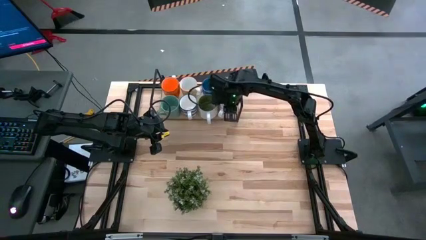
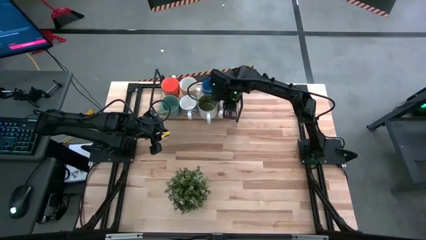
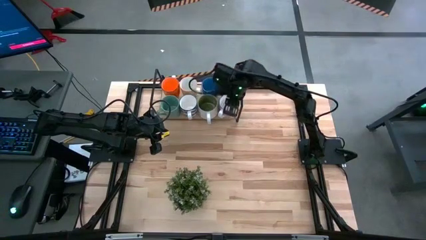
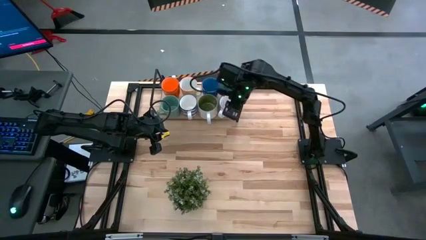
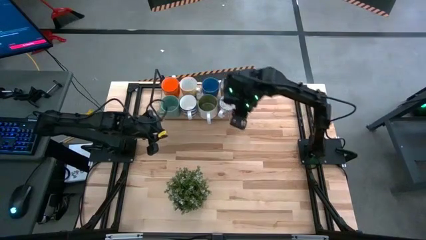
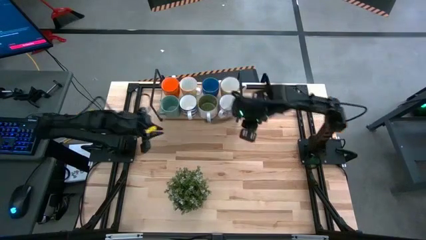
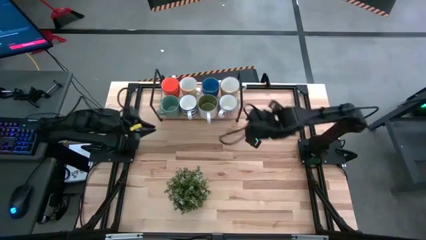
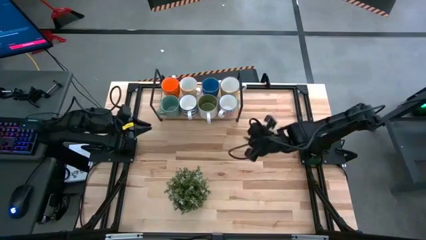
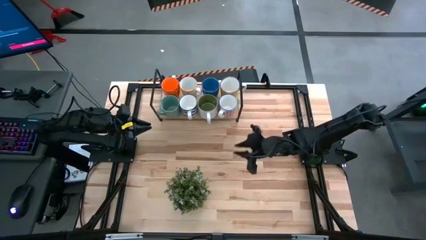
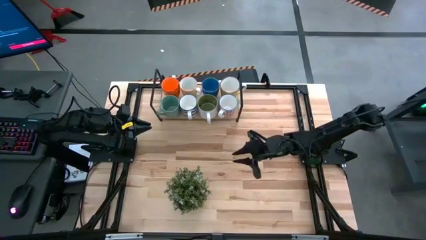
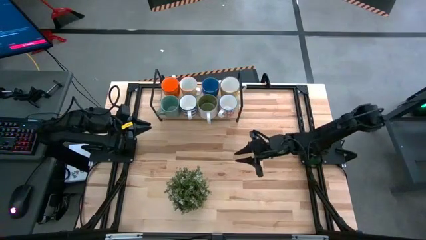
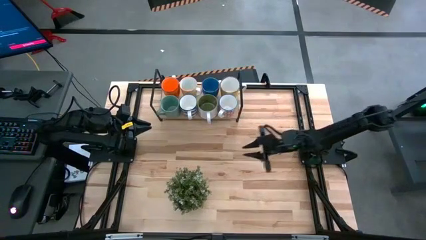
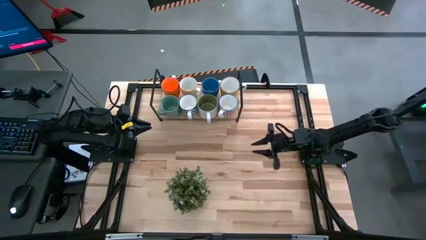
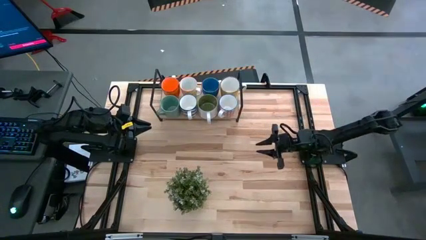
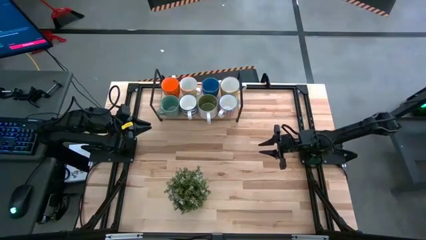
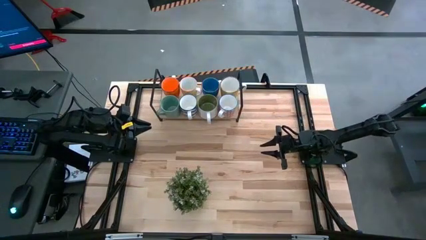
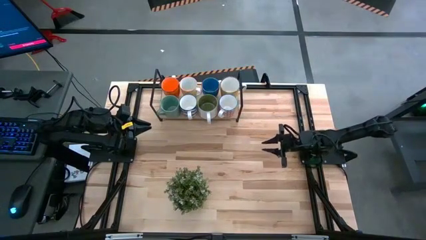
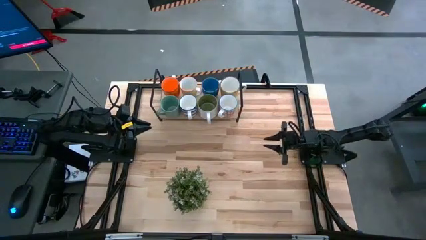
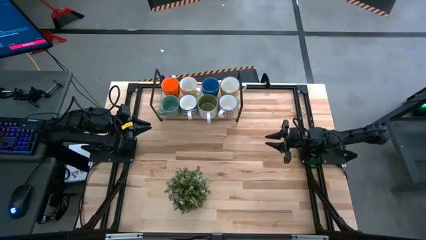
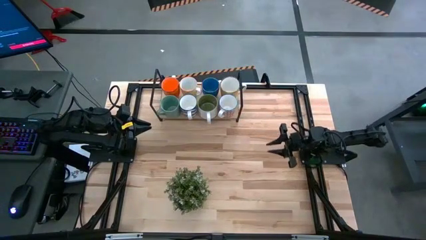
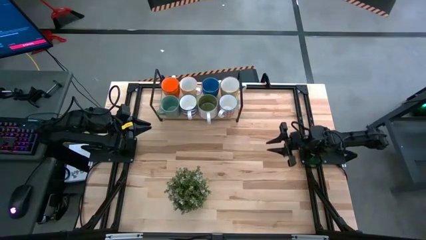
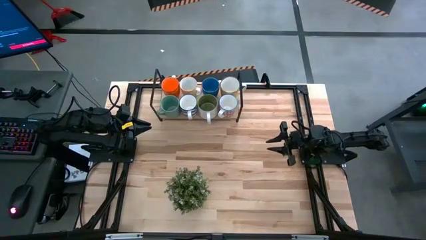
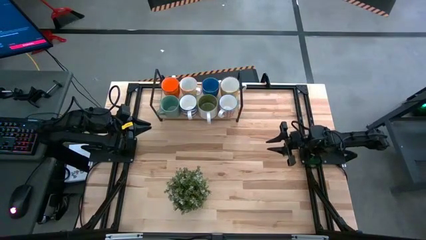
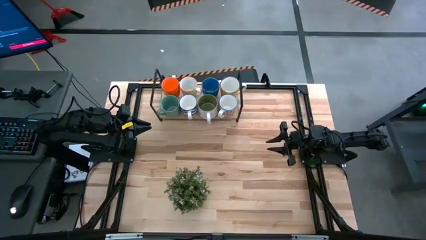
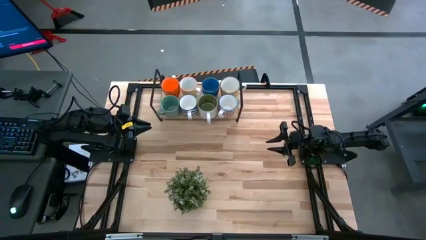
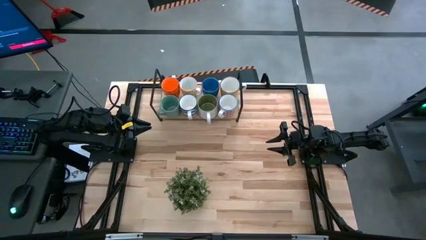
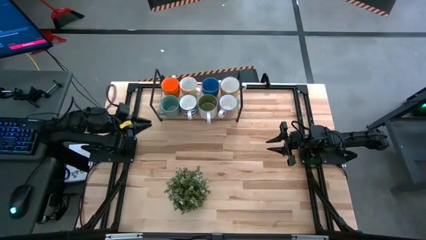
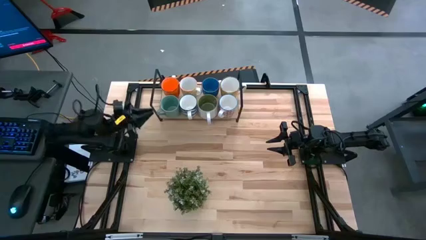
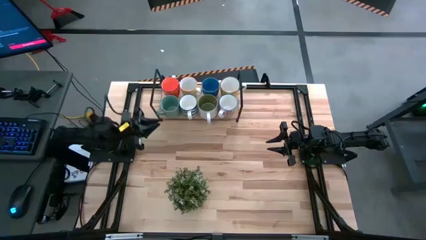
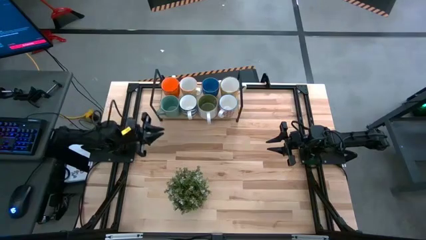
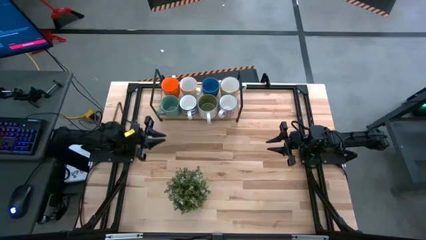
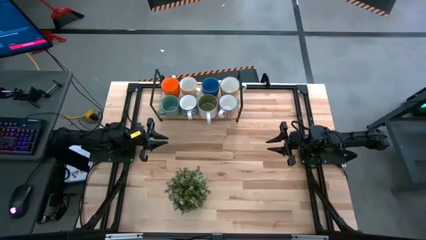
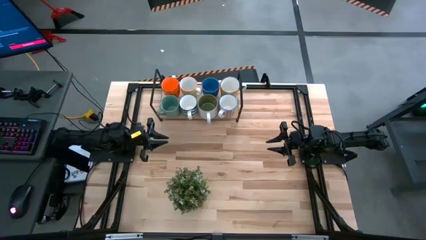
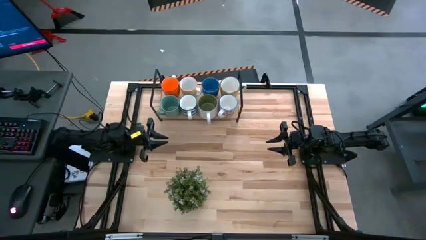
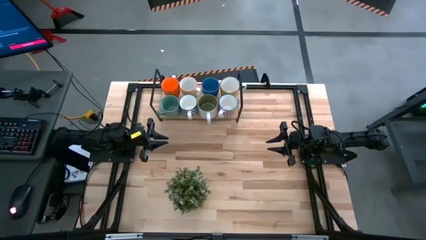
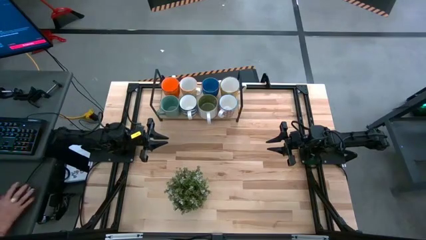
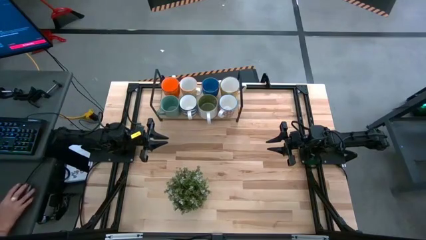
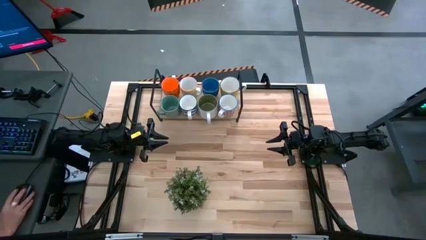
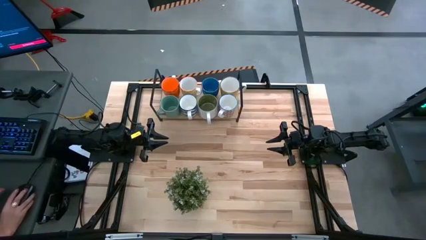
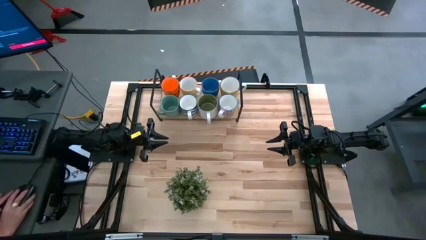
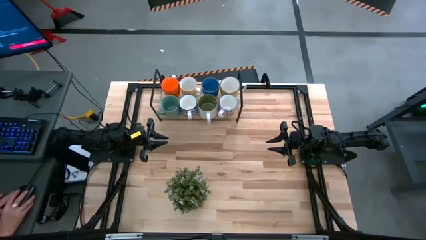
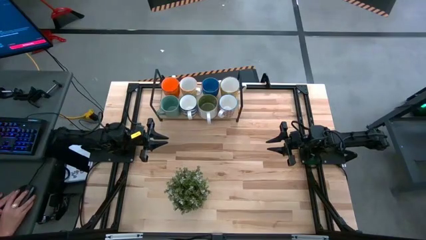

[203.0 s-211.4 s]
Task: Place coffee mugs
Return to Home Position

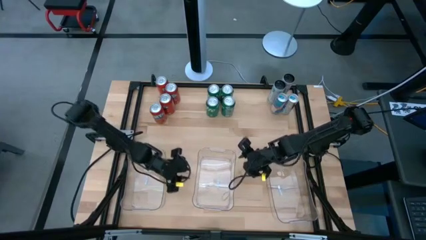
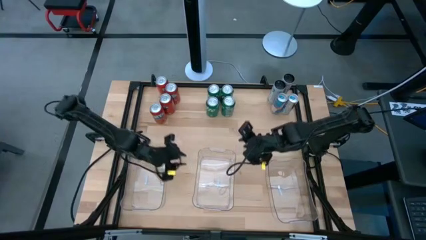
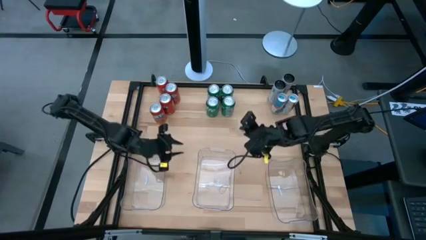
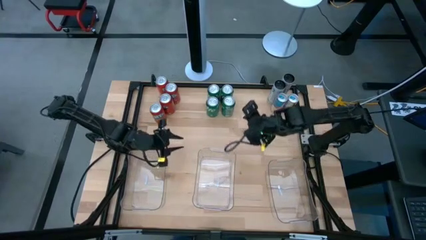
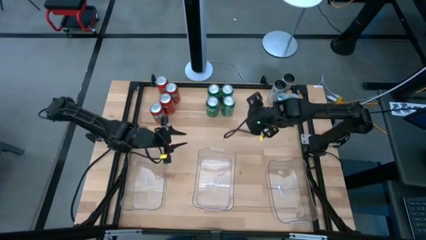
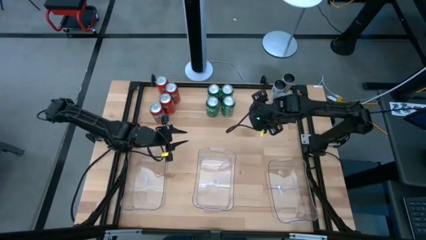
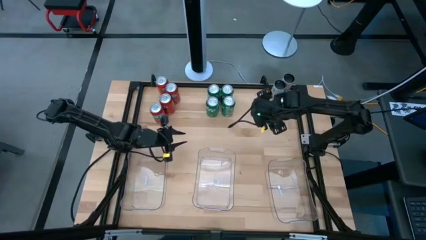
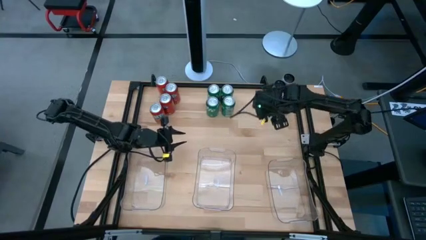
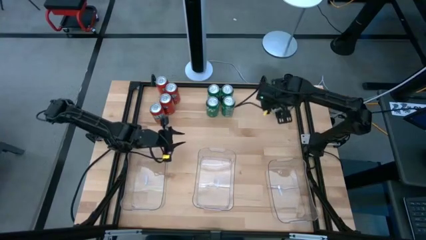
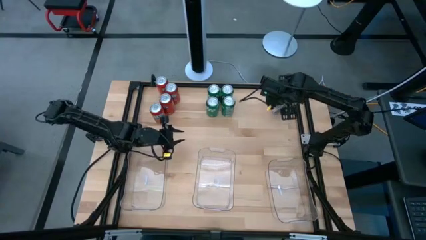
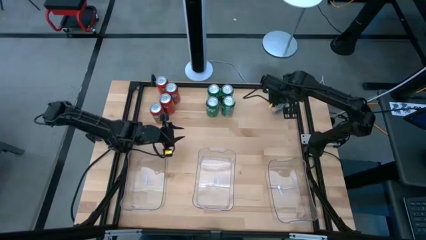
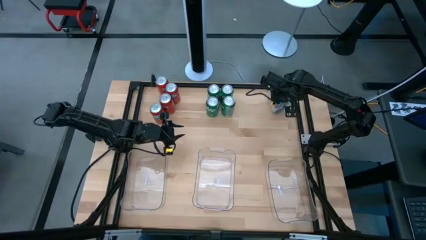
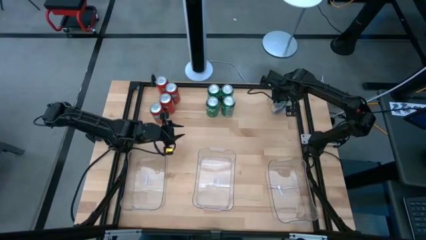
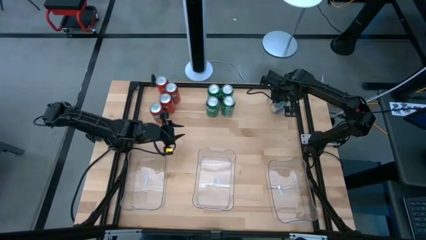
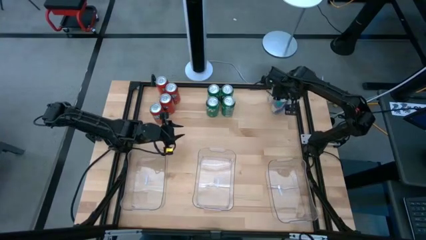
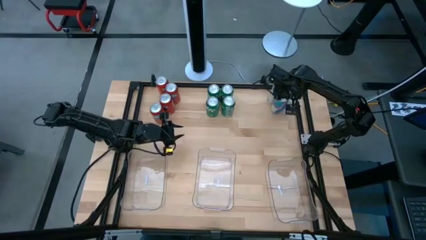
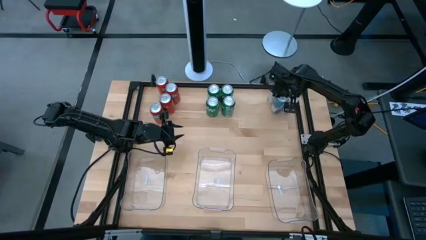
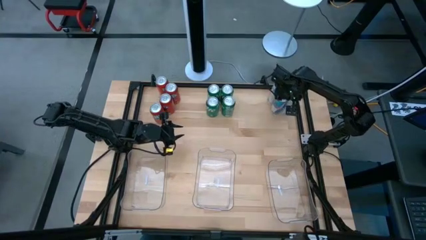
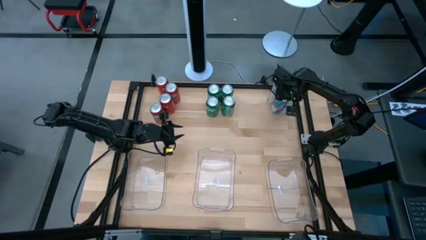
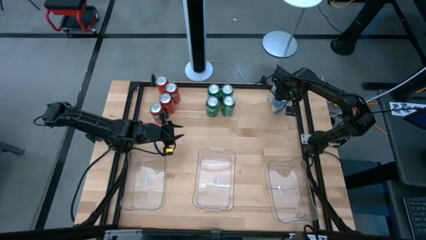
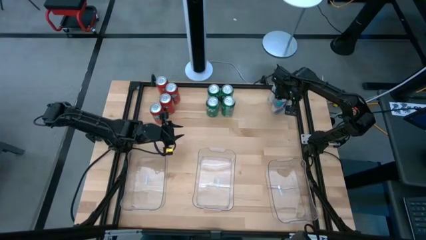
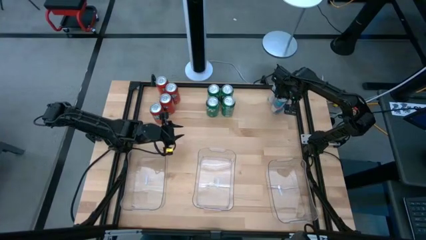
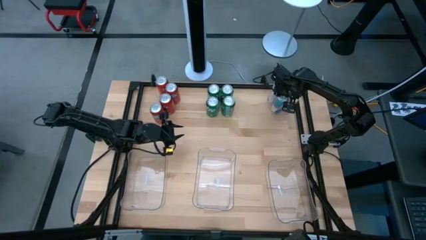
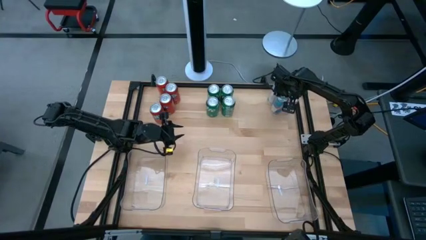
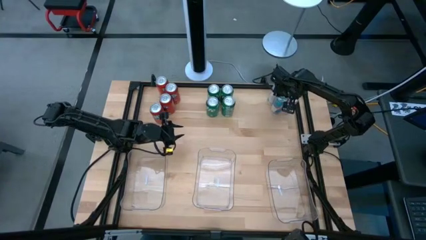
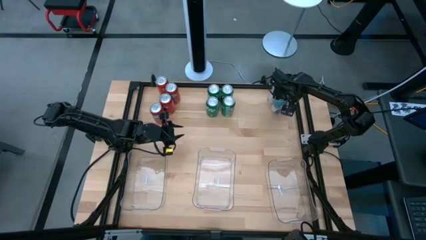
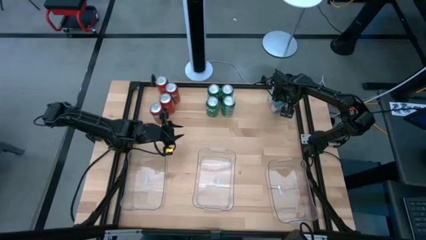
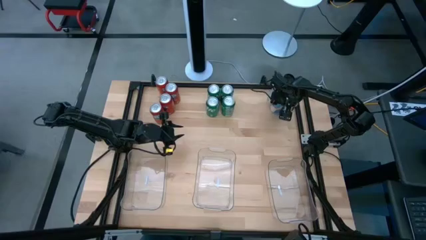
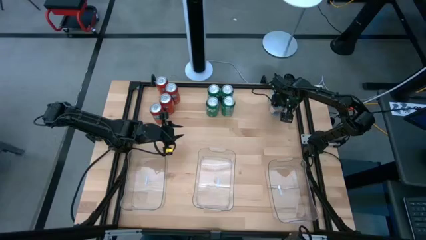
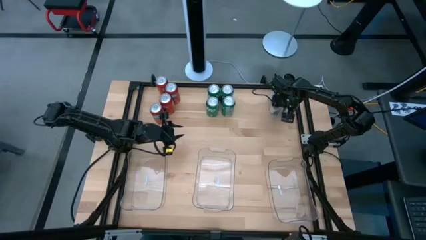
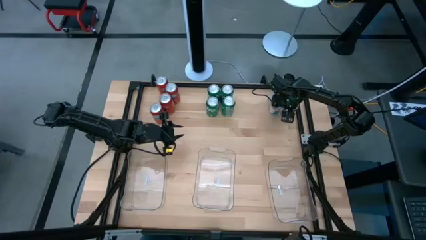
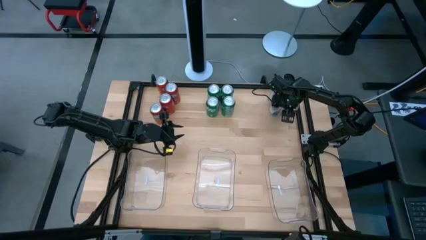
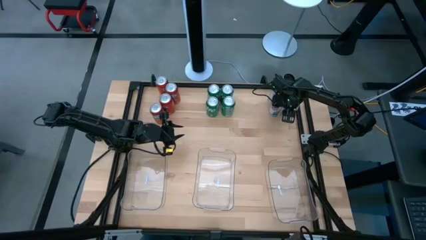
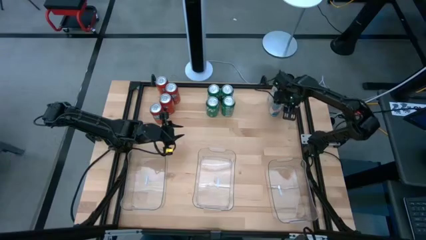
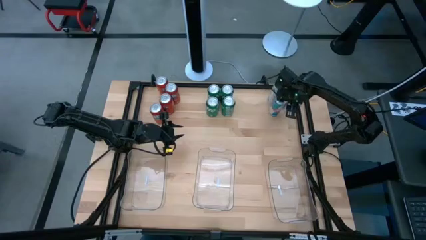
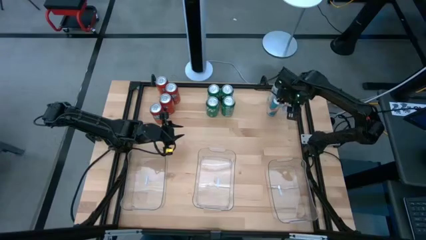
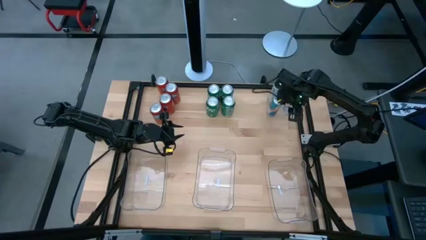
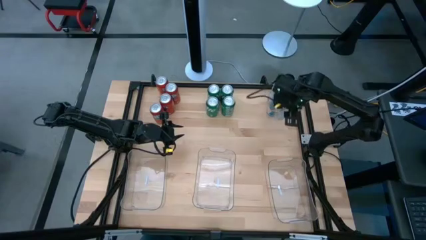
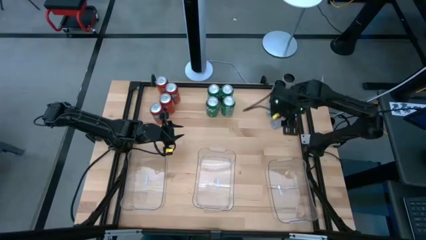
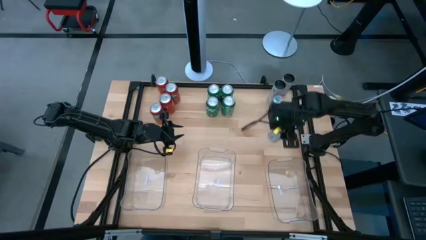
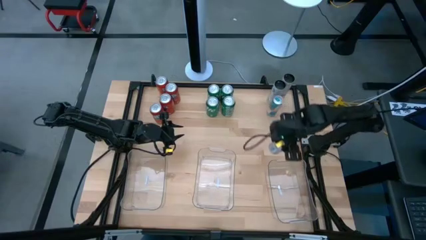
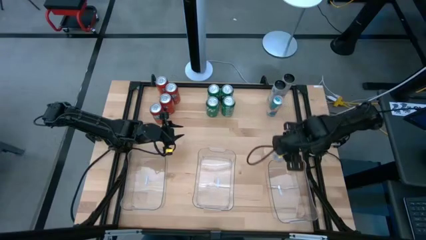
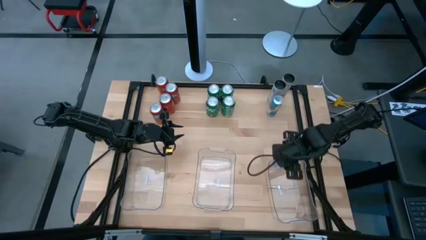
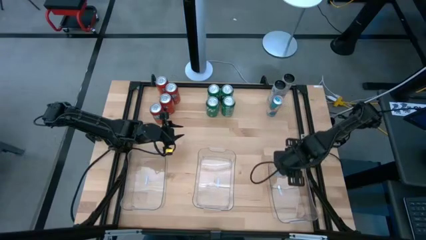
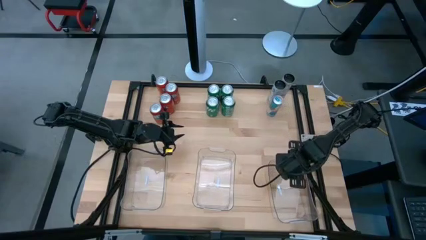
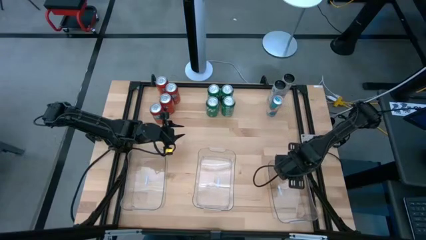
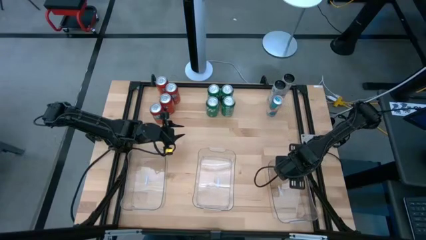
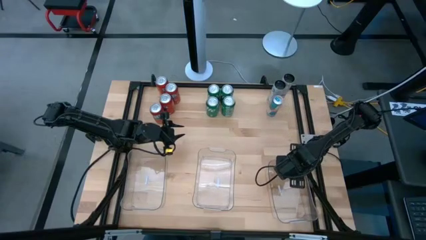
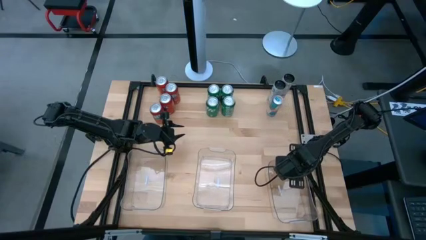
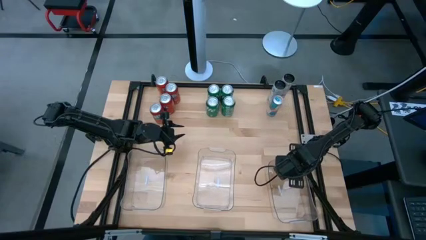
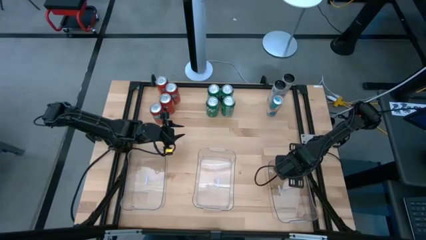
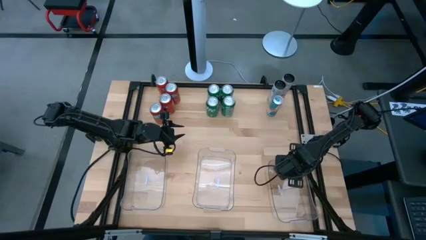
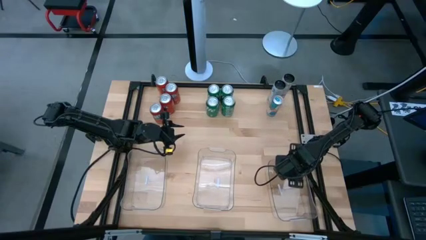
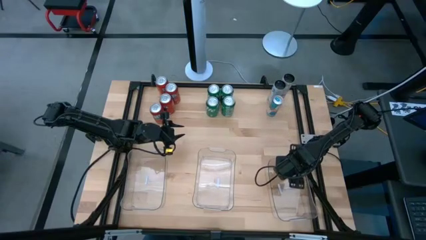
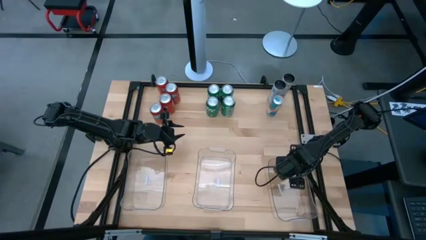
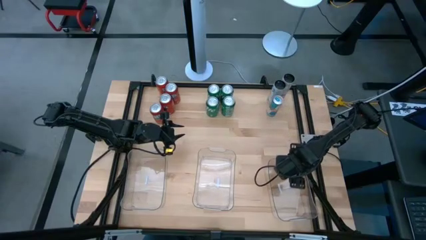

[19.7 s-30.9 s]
Task: Sort soda cans
Put the blue soda can into the right transparent bin
